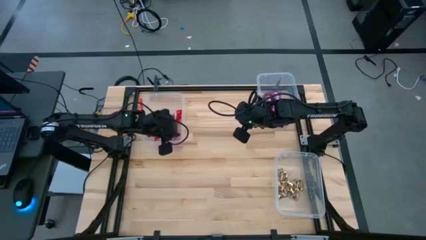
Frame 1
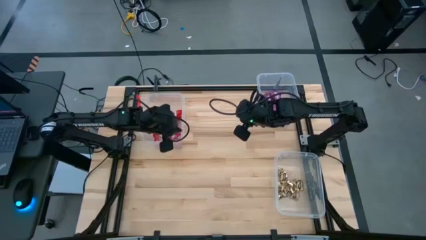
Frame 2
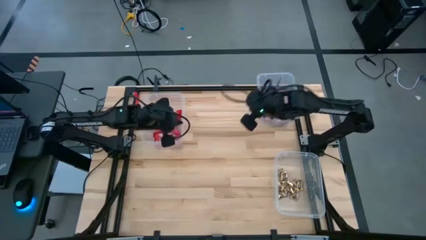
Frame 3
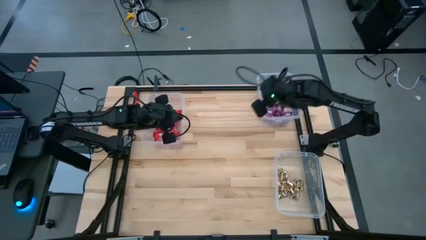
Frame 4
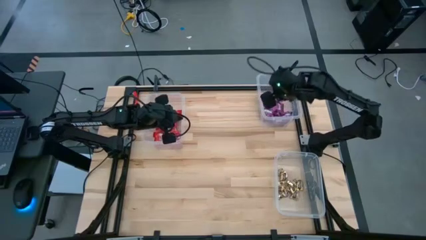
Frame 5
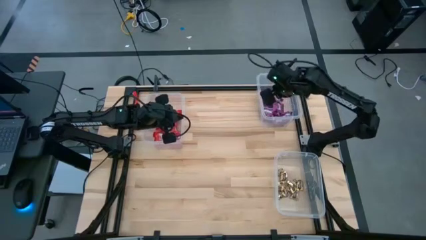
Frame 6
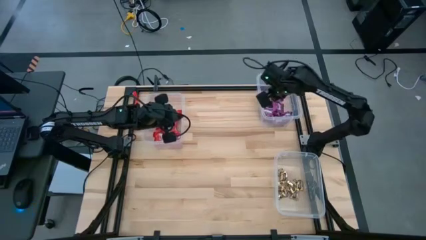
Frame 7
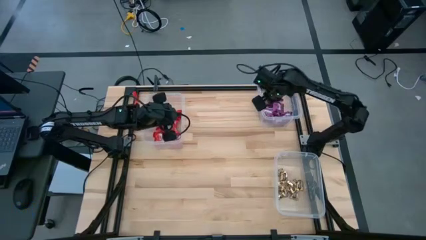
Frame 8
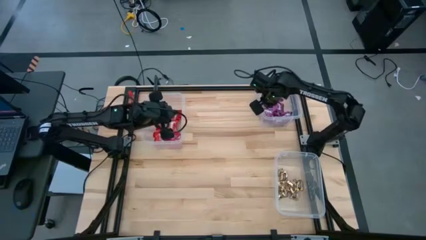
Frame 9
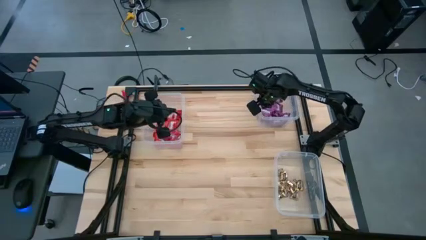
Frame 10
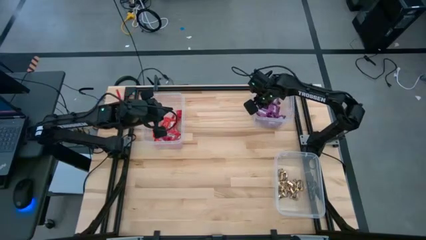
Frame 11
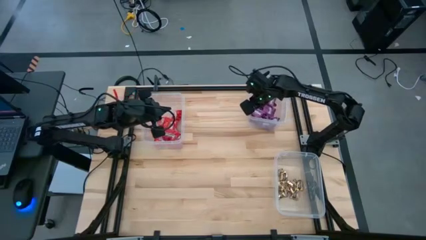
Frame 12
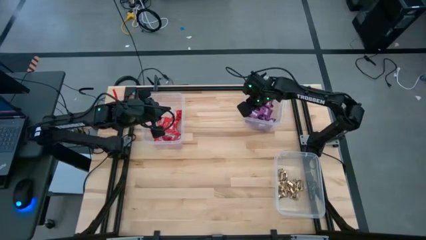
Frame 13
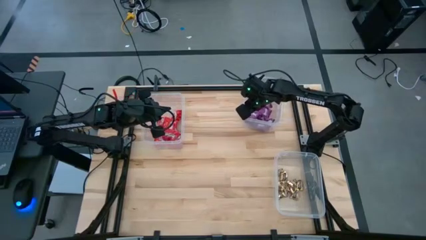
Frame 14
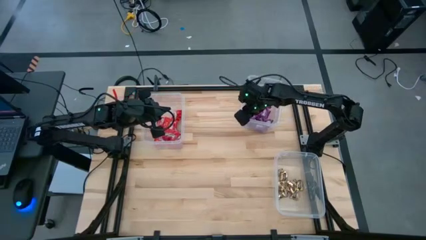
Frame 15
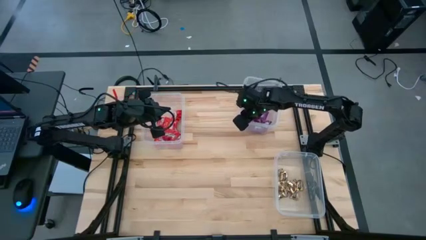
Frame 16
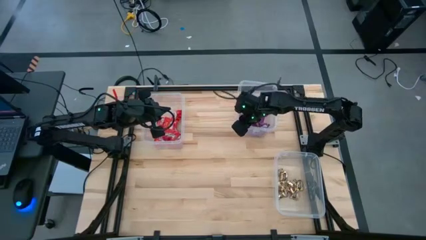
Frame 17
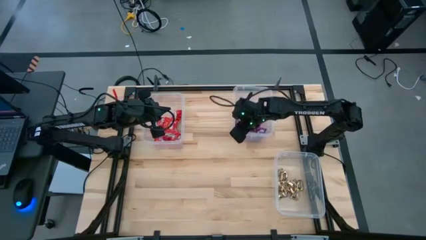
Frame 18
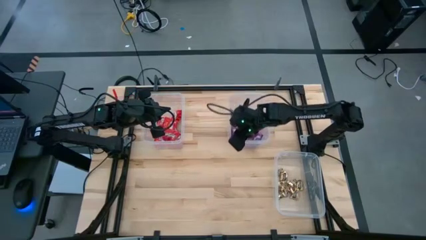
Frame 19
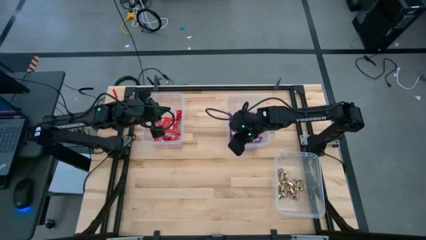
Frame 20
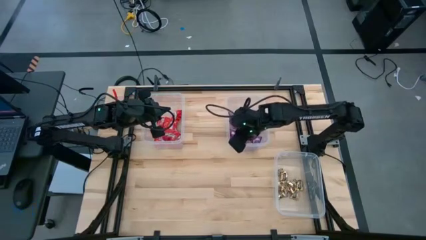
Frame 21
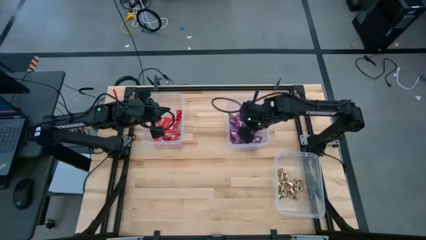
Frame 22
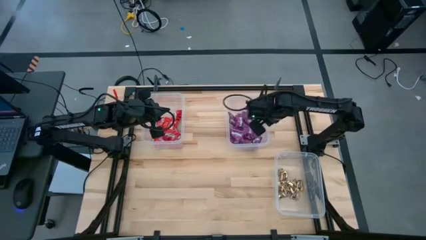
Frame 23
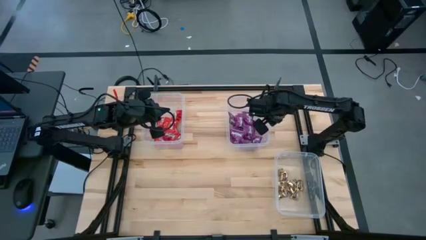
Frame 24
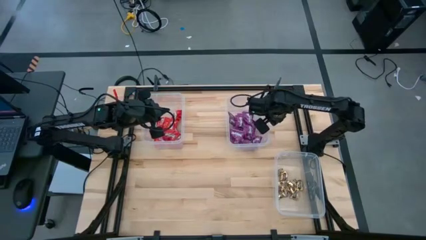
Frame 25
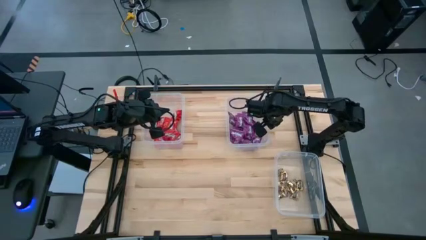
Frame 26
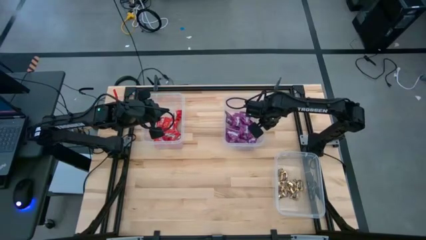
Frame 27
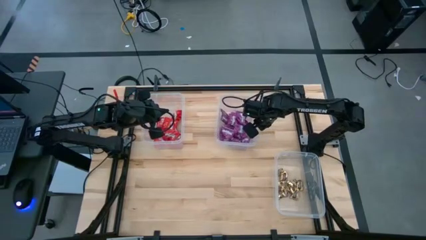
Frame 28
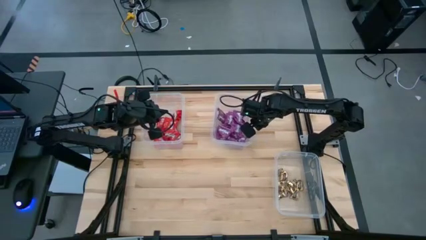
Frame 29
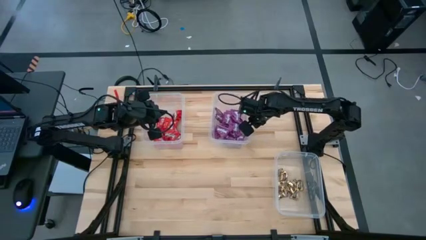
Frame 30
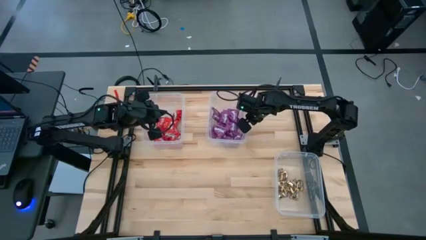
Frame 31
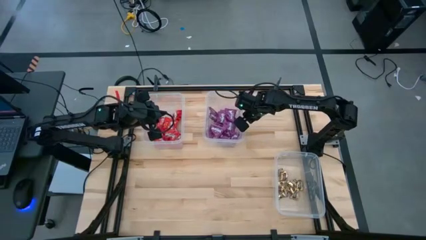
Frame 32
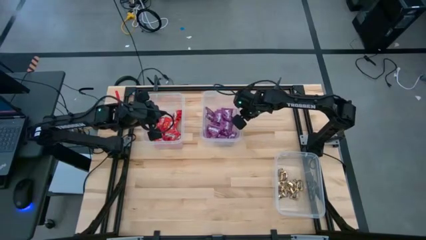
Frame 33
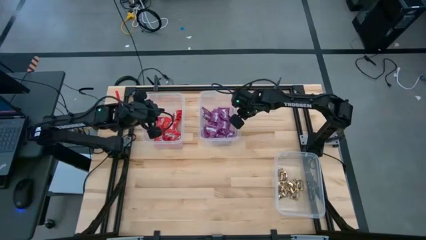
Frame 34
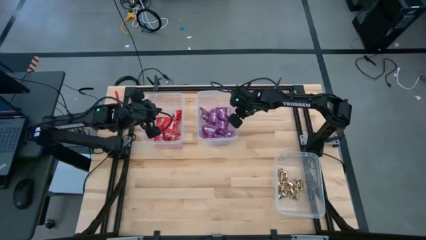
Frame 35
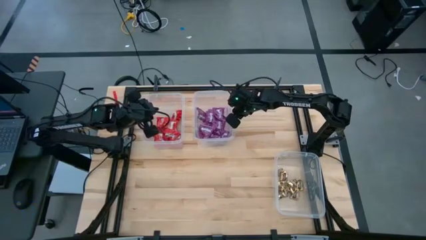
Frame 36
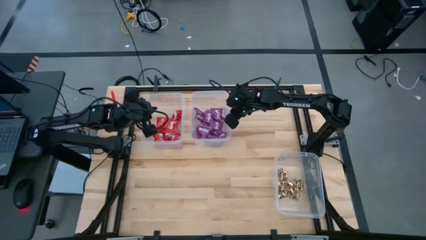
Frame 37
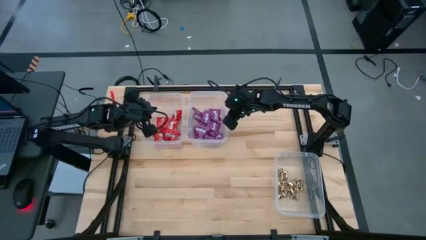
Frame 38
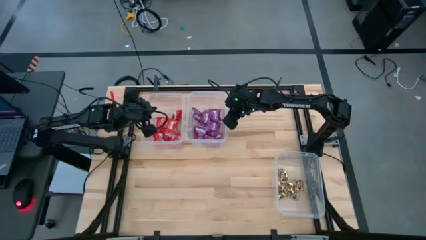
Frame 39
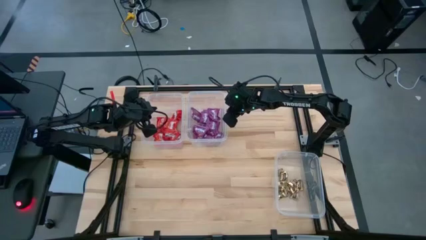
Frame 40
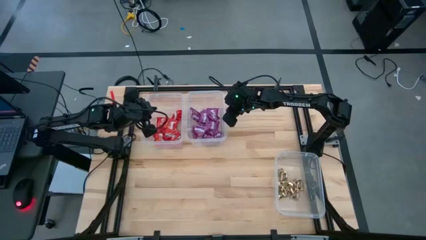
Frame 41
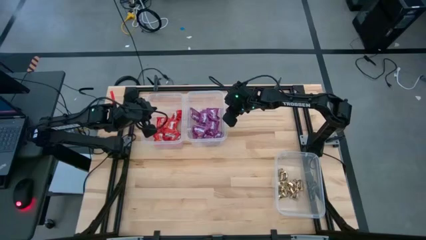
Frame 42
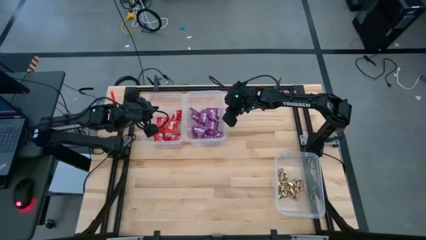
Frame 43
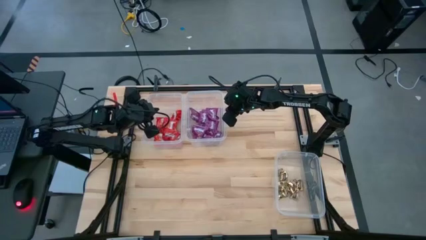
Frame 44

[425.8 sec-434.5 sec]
Task: Sort candy
Move the transparent bin into the top center

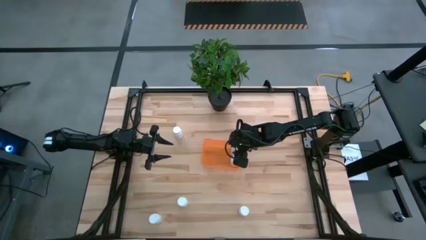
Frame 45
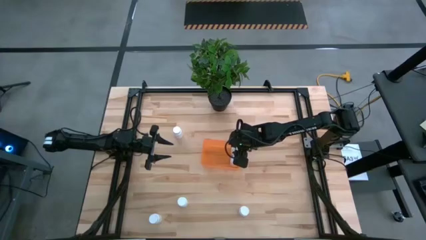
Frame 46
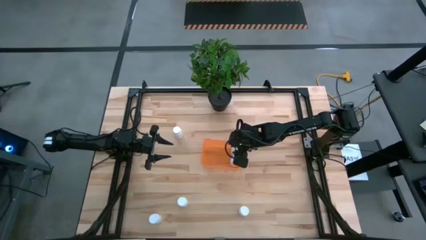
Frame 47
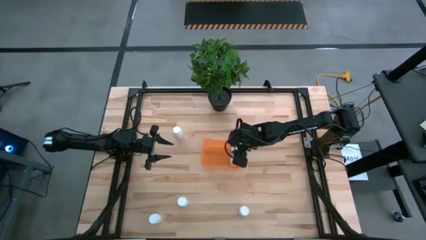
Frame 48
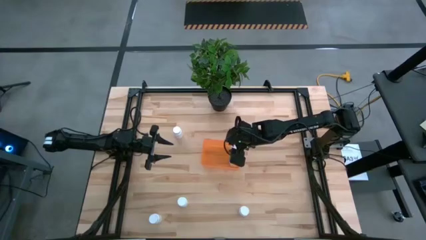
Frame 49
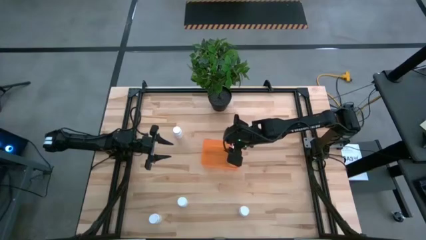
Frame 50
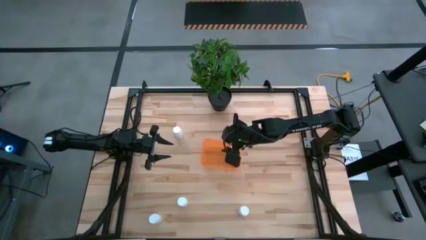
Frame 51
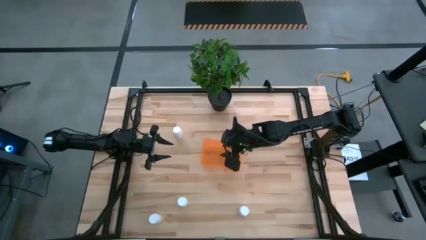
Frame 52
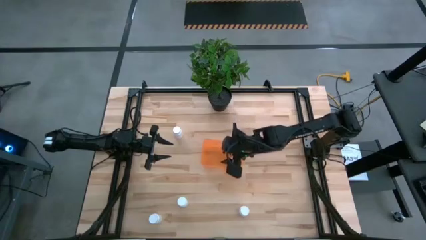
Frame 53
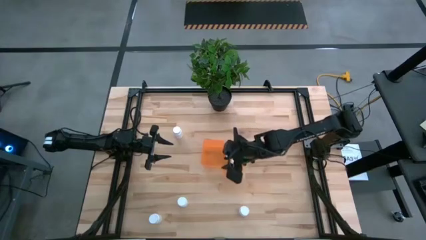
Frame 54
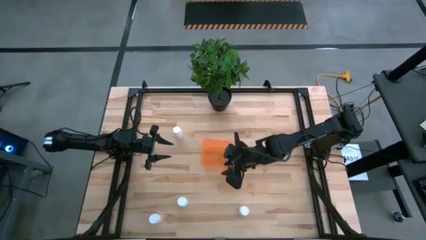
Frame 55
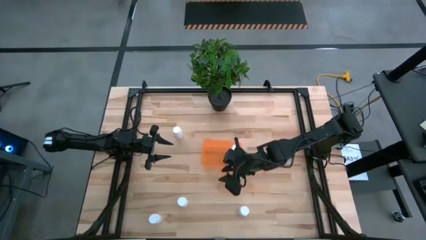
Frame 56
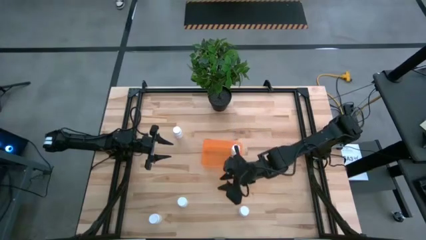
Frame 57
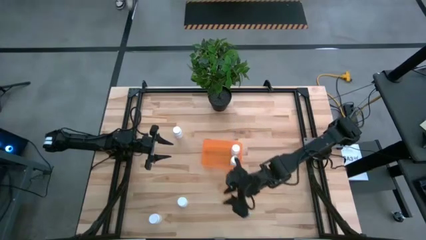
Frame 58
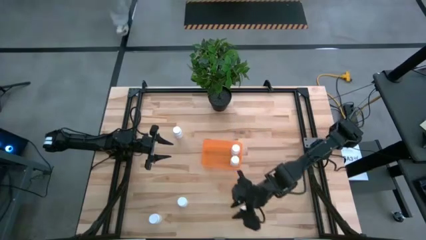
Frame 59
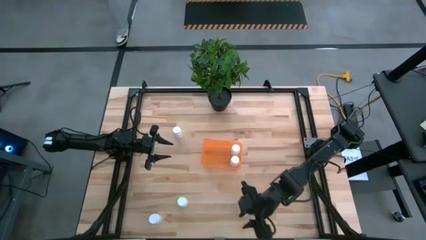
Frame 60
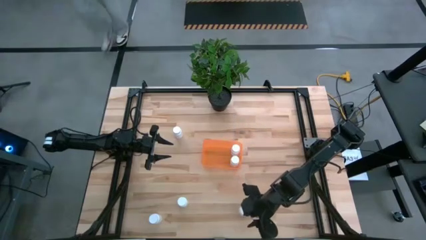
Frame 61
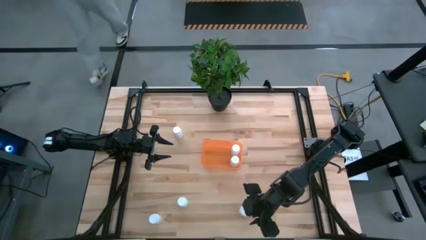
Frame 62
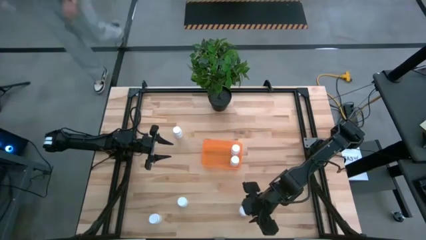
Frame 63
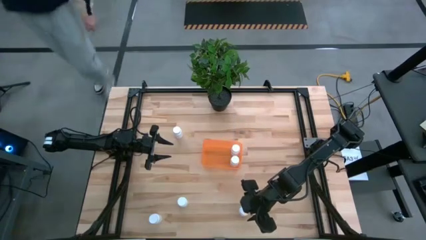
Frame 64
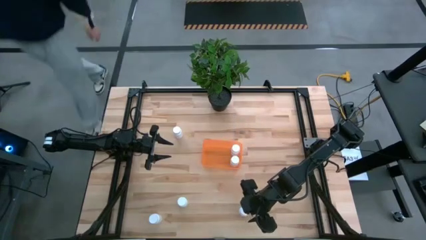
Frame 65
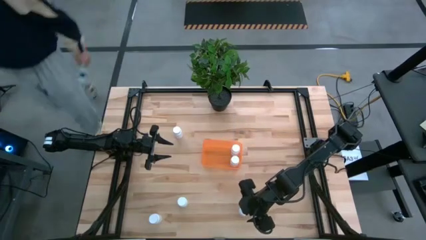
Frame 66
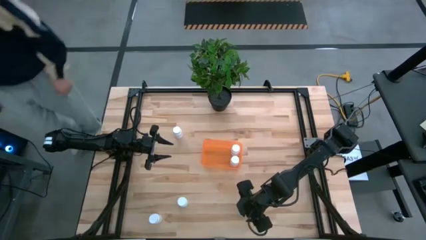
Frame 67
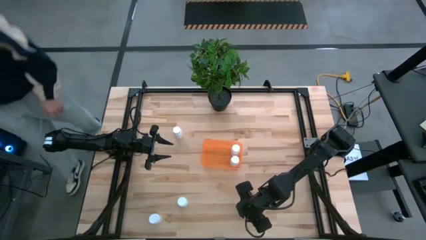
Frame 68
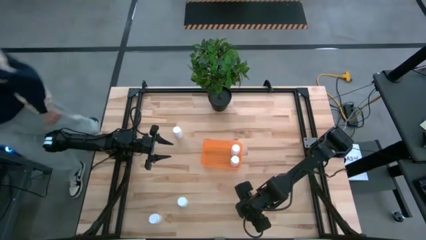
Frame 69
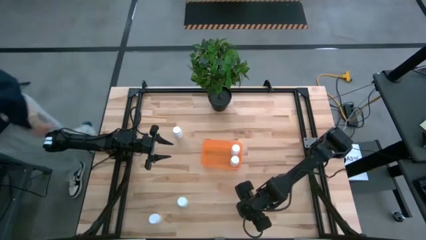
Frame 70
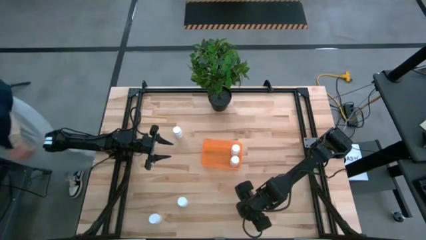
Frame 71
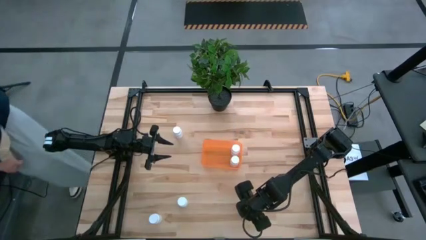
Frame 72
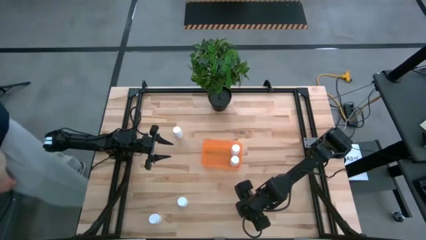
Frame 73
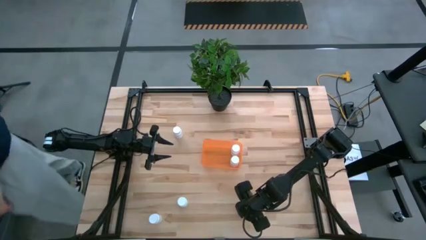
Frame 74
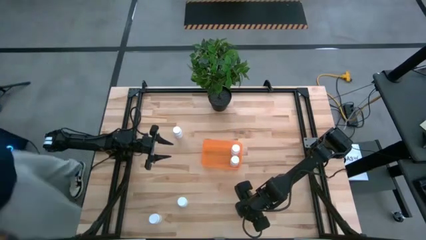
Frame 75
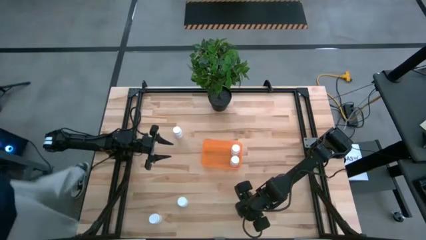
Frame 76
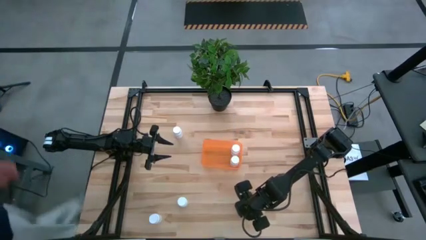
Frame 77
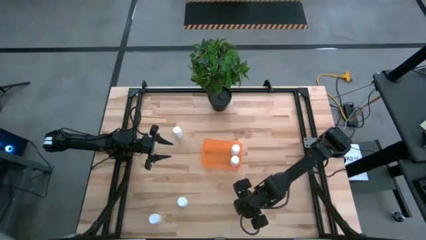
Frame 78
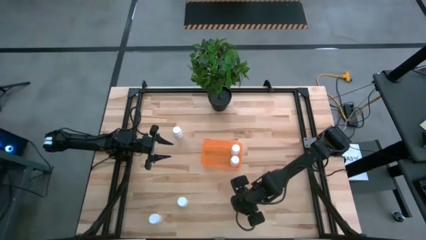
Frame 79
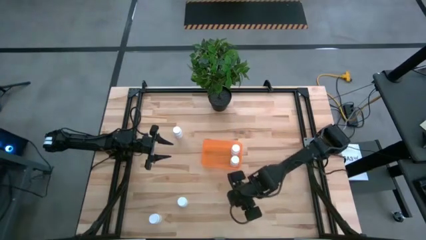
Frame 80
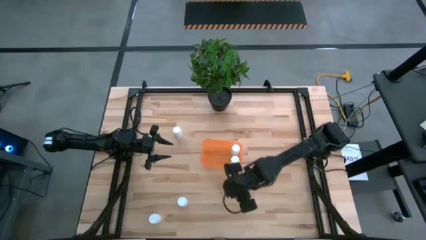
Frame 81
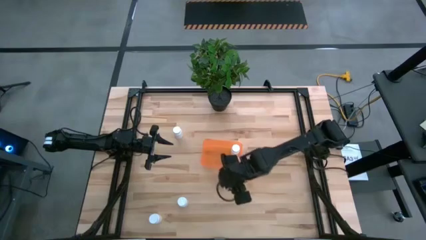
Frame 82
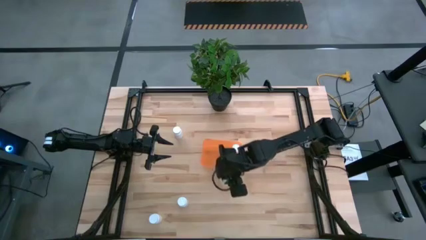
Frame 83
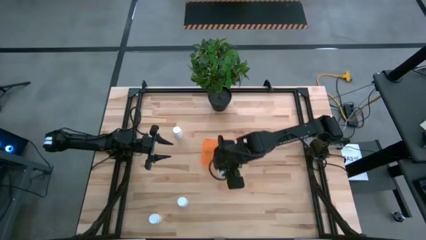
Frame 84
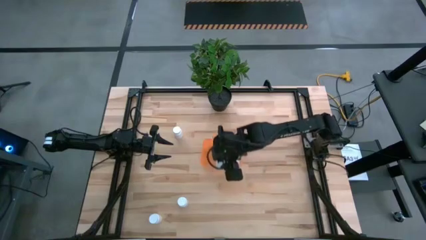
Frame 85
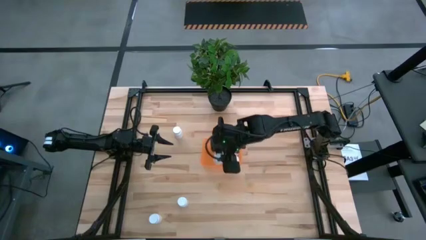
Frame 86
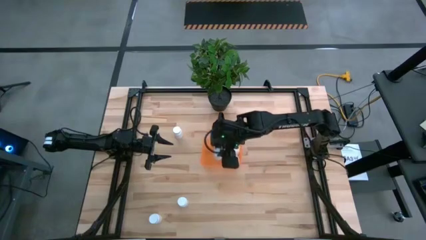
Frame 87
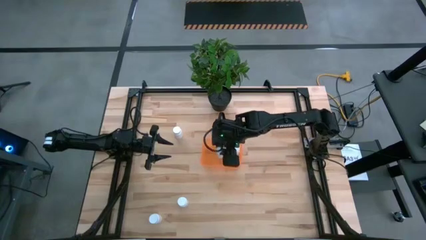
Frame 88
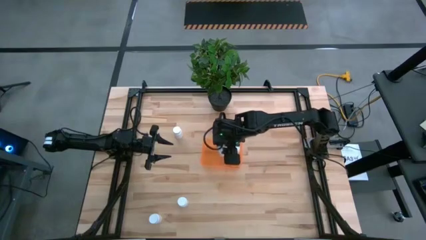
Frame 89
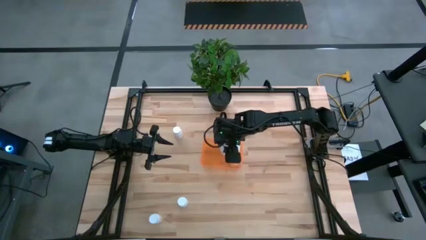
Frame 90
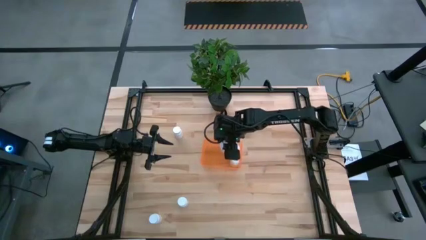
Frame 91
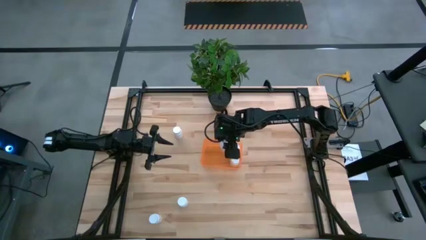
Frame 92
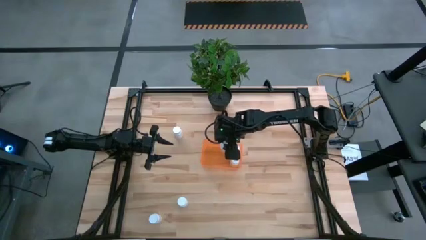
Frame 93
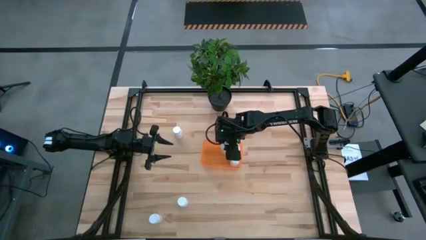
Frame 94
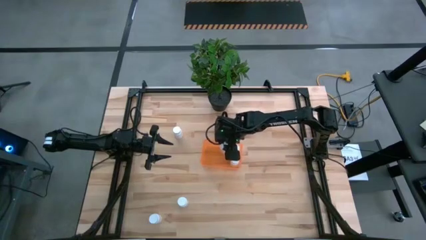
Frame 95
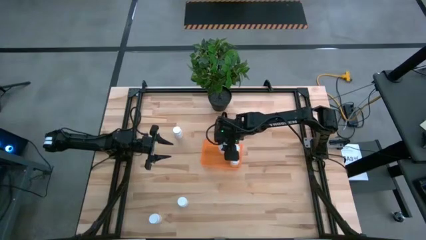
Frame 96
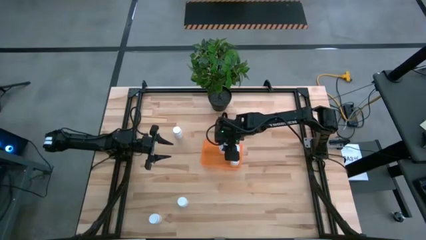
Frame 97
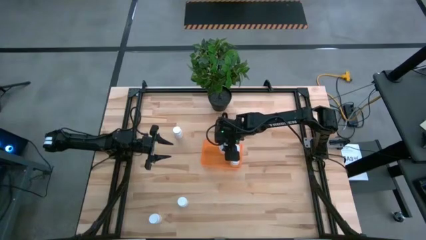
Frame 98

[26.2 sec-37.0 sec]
Task: Pick and place pill bottles into a basket
Put the white pill bottle into the orange bin
